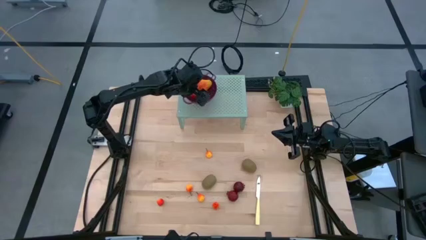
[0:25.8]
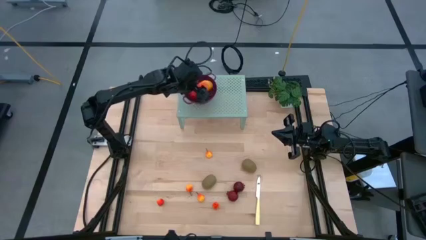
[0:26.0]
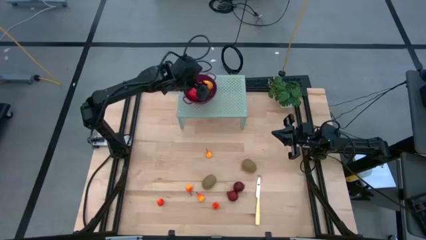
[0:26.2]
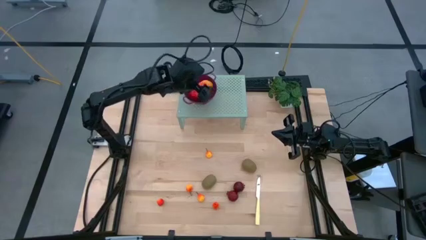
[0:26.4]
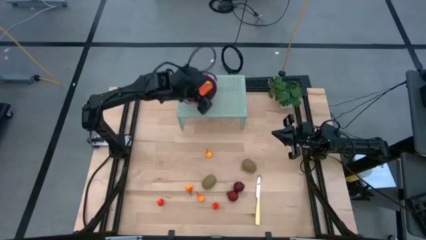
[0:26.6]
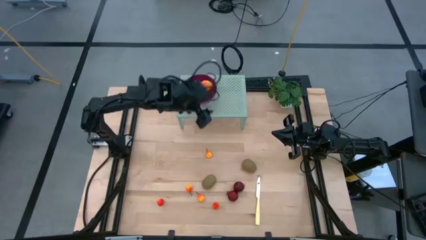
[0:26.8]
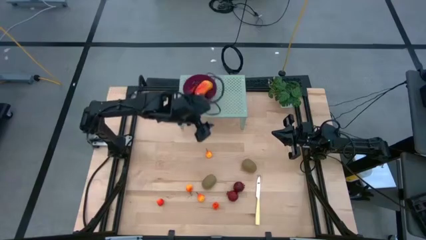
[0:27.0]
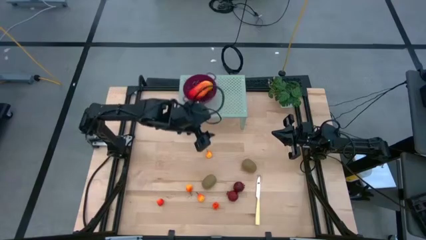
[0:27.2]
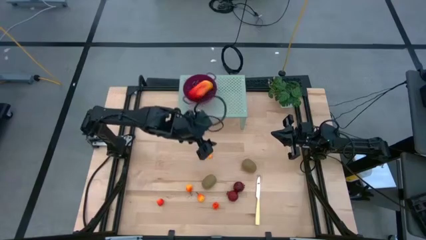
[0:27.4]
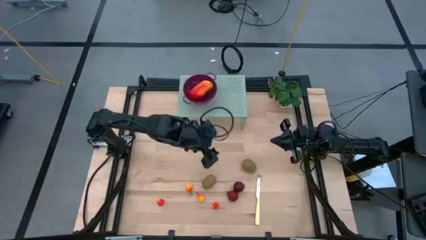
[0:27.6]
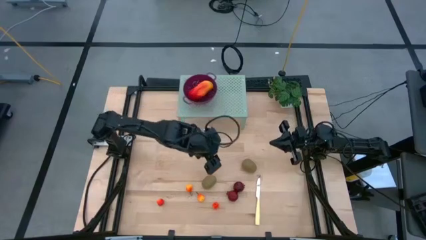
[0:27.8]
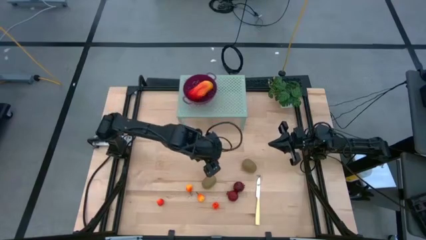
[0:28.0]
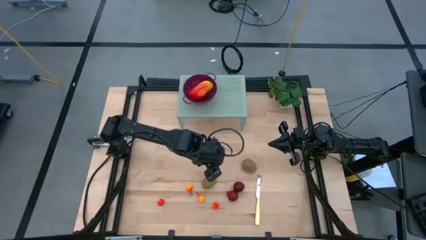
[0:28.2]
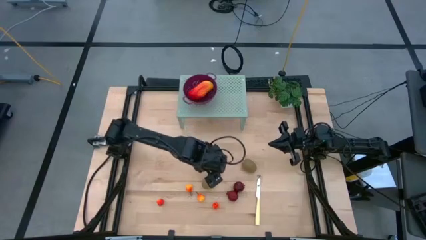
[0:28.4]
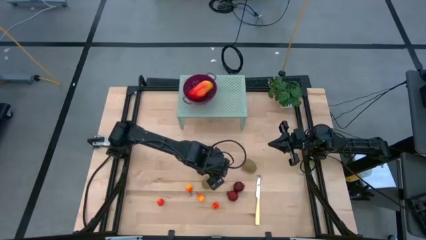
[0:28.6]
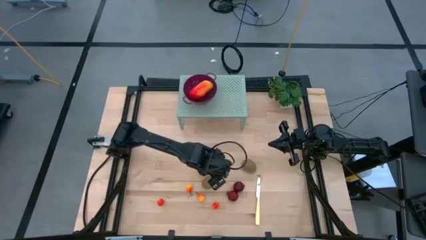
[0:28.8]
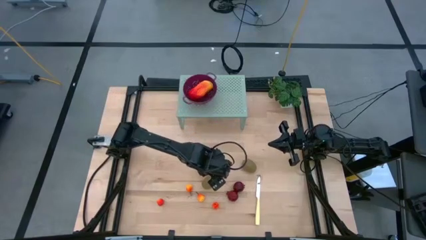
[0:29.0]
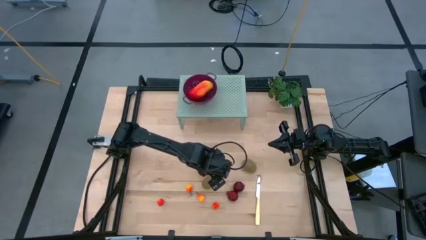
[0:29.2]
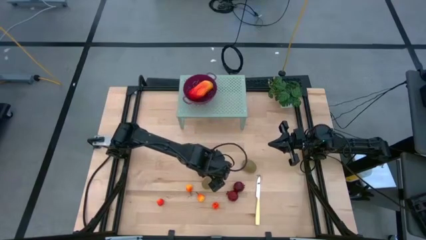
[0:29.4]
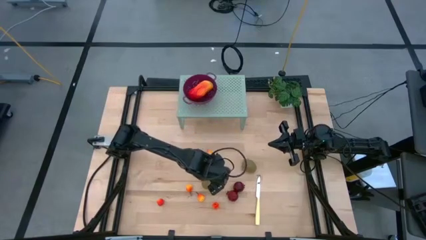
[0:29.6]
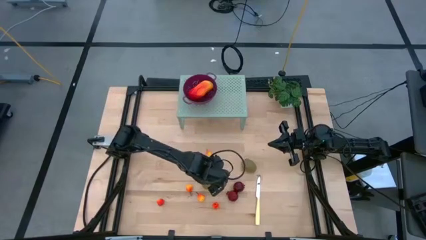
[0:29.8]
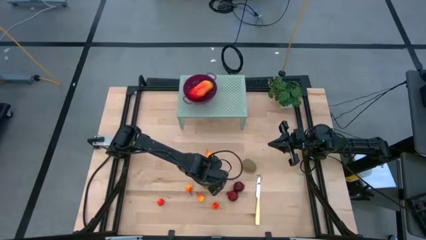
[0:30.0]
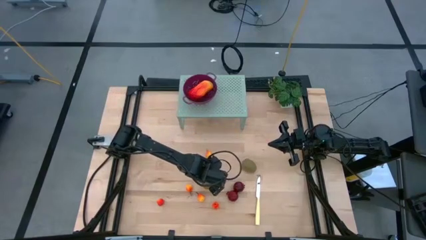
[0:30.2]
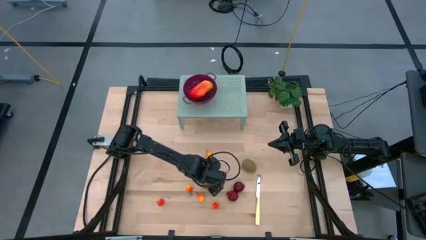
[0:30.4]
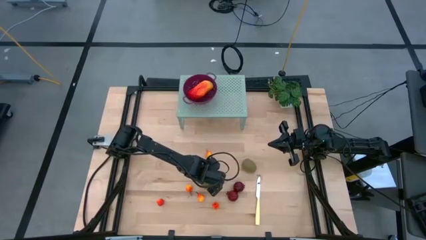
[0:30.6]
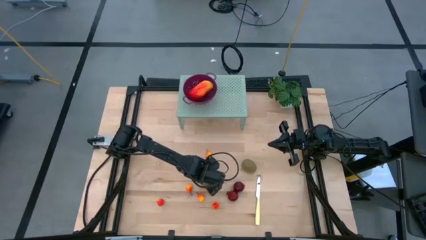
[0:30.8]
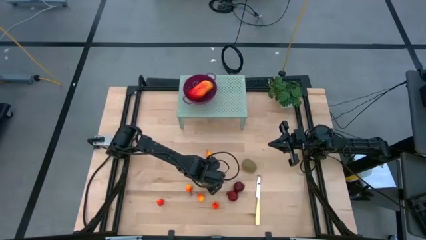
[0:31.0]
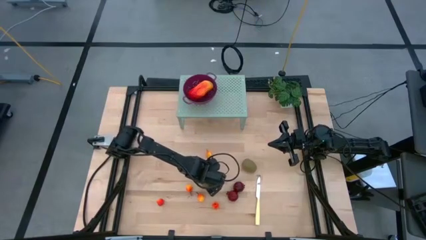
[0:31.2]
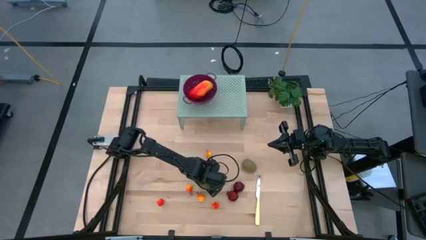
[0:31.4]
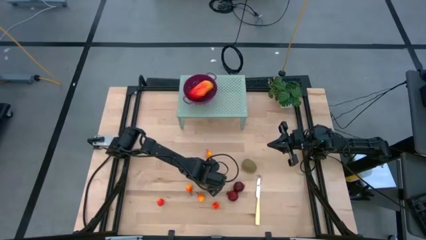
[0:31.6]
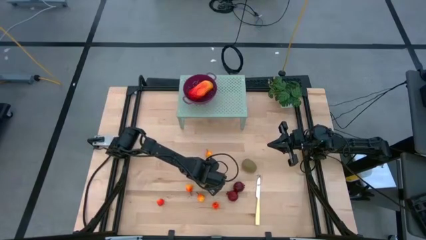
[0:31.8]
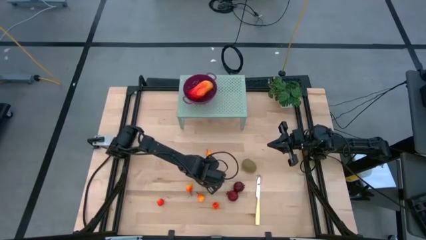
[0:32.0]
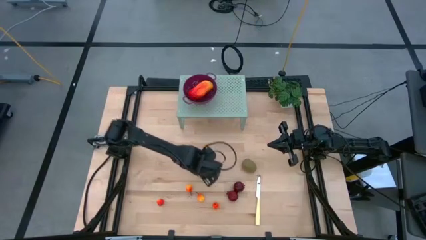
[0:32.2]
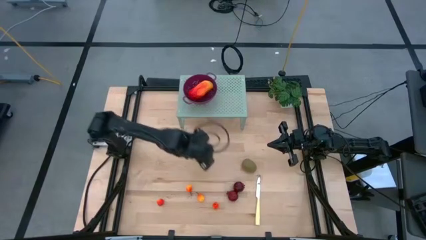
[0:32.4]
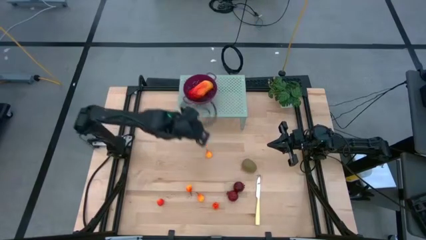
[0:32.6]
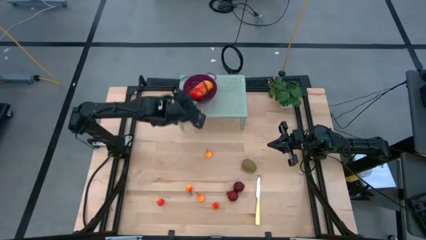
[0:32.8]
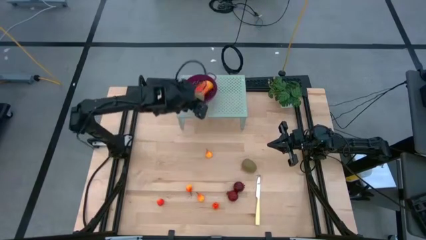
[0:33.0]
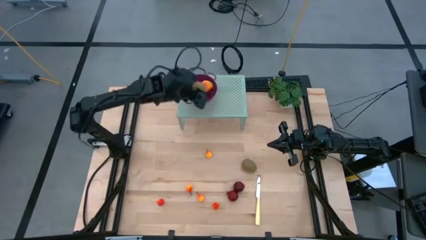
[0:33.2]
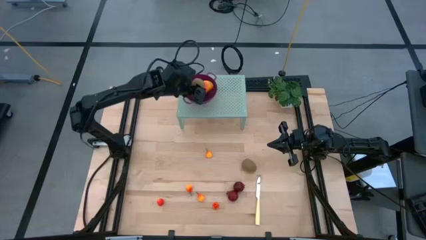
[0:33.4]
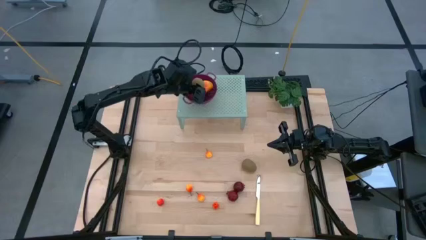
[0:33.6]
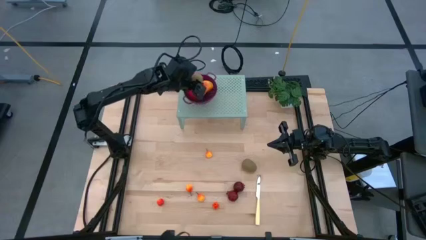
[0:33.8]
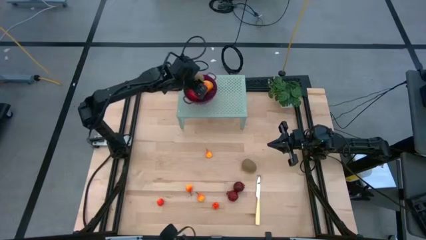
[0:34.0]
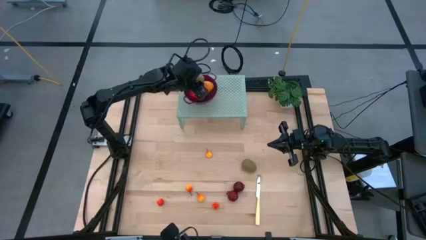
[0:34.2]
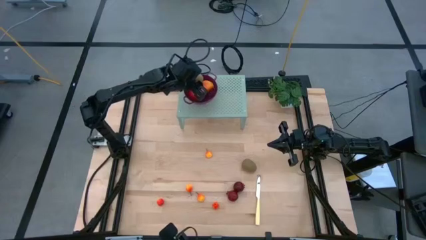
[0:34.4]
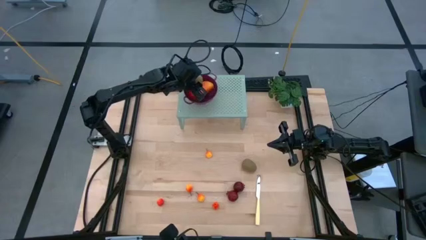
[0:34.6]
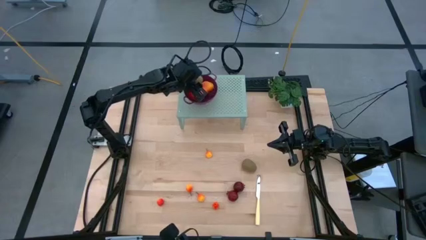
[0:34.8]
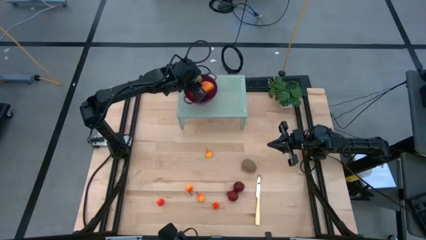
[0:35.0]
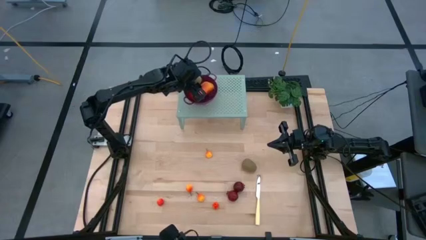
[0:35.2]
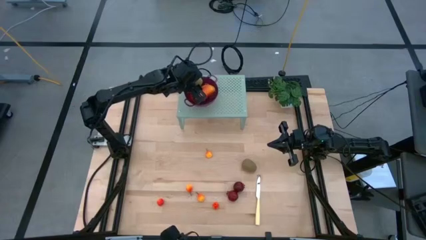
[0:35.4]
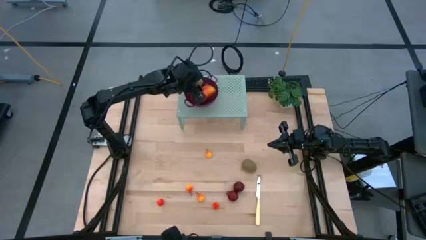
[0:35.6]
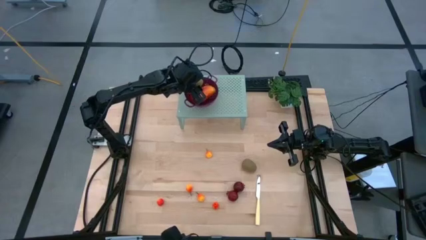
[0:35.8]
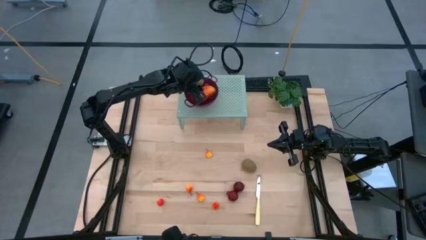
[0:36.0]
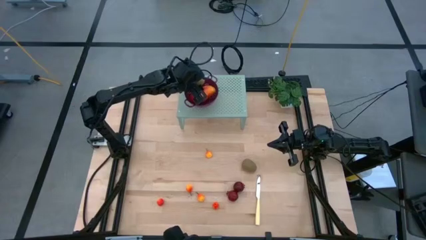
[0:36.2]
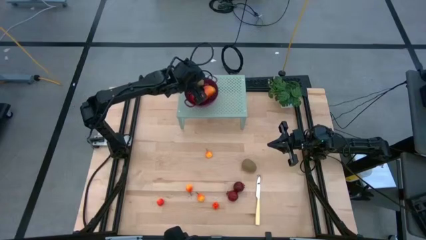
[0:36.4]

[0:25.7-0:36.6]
Task: Pick & Place Fruit
Put the brown kiwi in the red strainer bowl on the shelf
